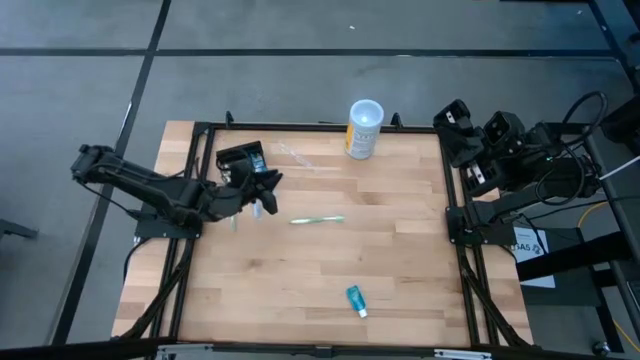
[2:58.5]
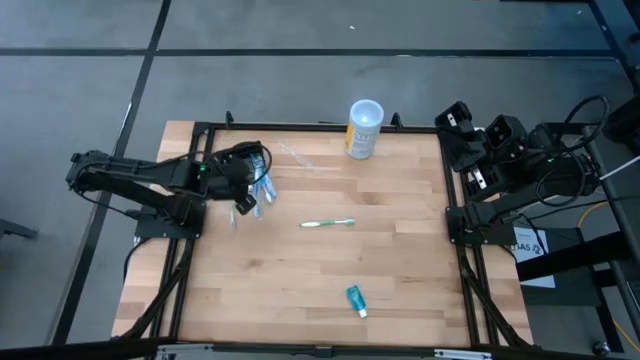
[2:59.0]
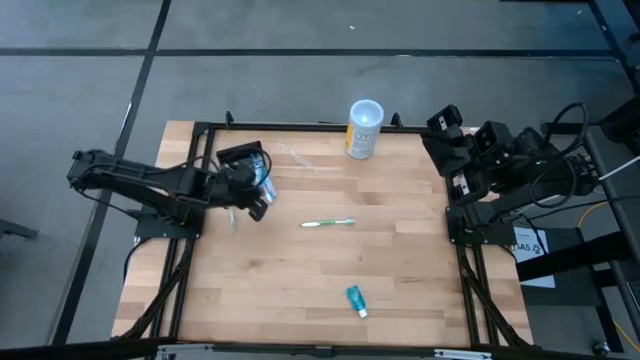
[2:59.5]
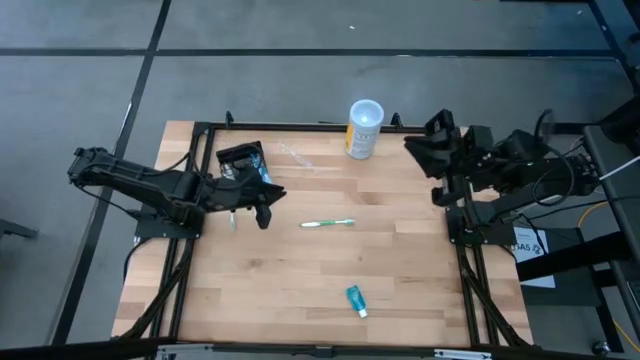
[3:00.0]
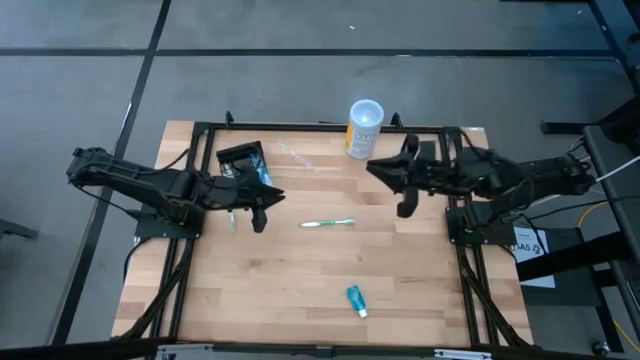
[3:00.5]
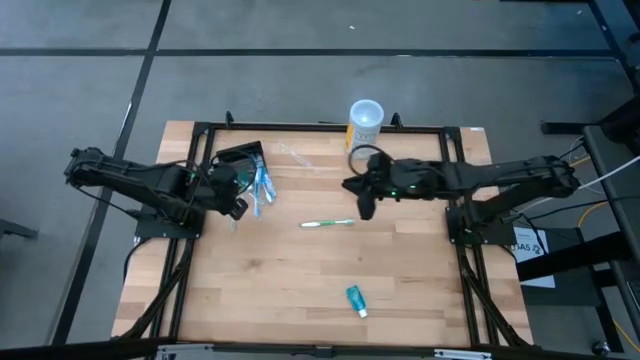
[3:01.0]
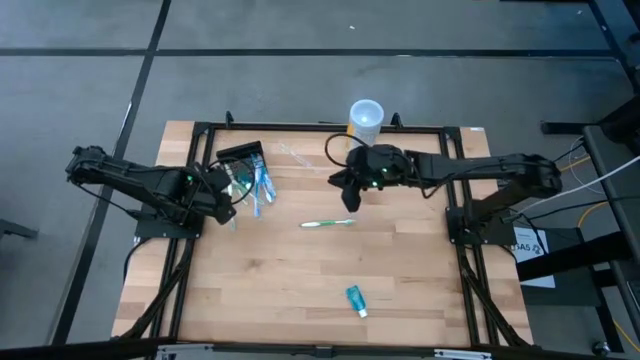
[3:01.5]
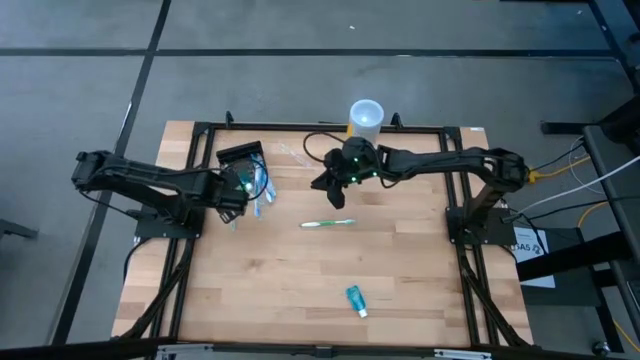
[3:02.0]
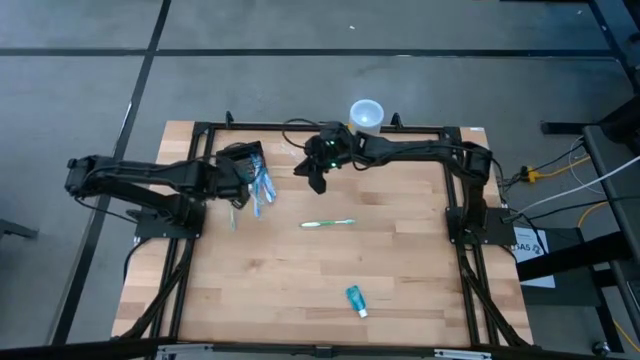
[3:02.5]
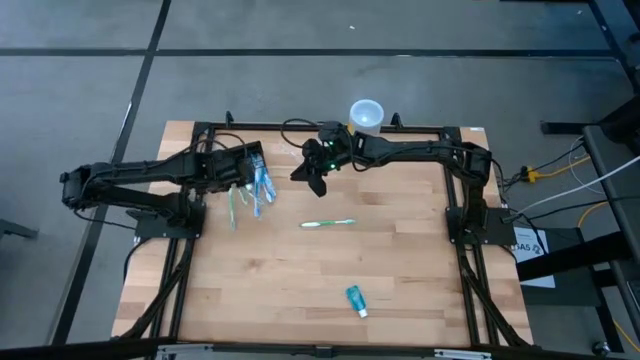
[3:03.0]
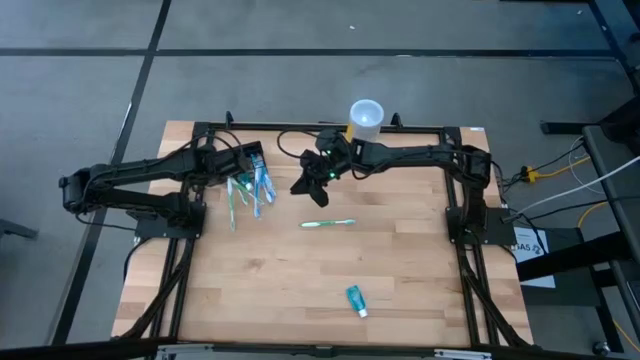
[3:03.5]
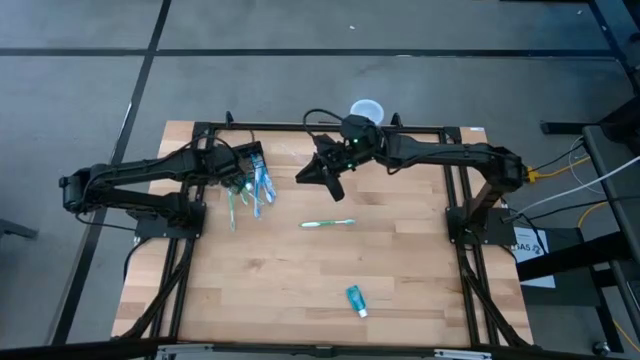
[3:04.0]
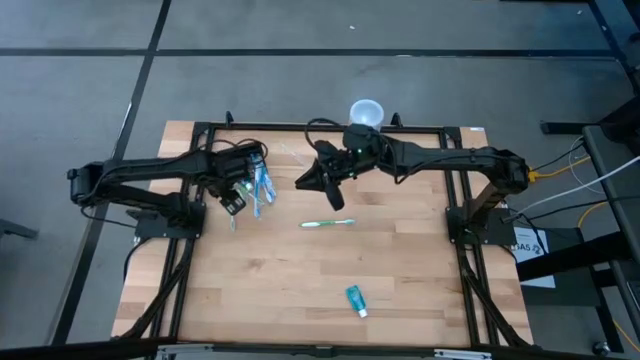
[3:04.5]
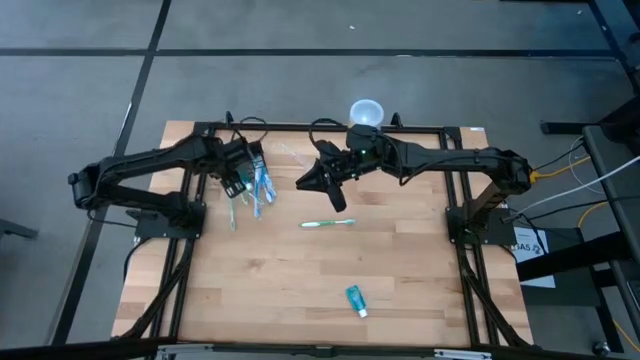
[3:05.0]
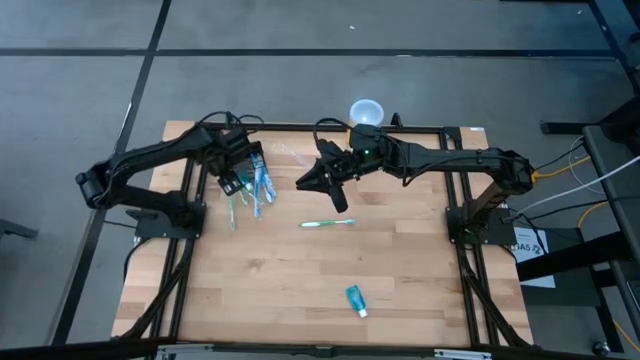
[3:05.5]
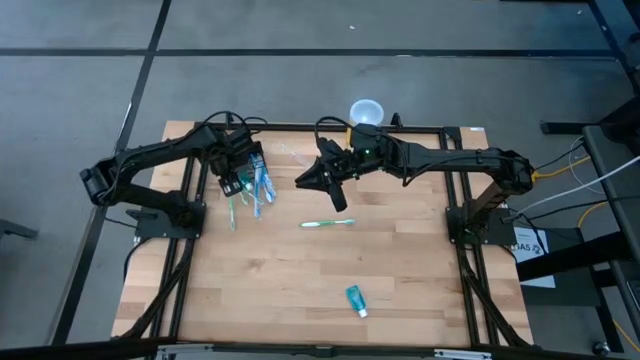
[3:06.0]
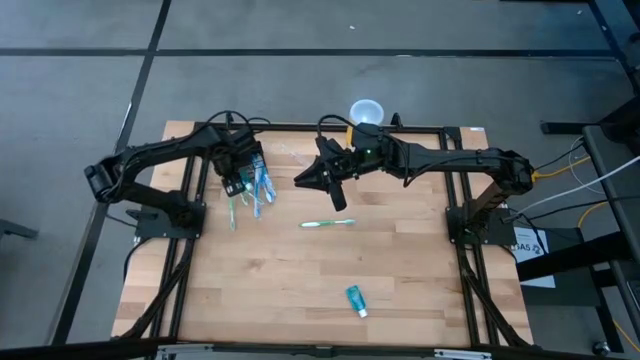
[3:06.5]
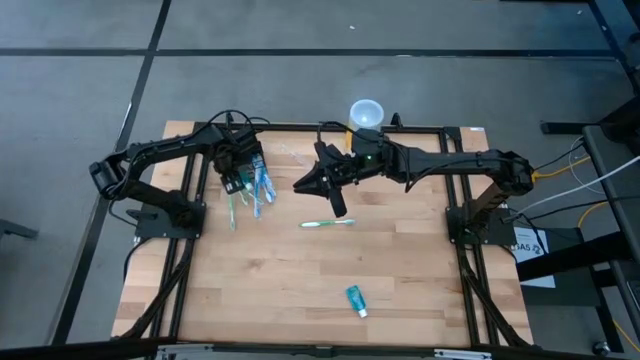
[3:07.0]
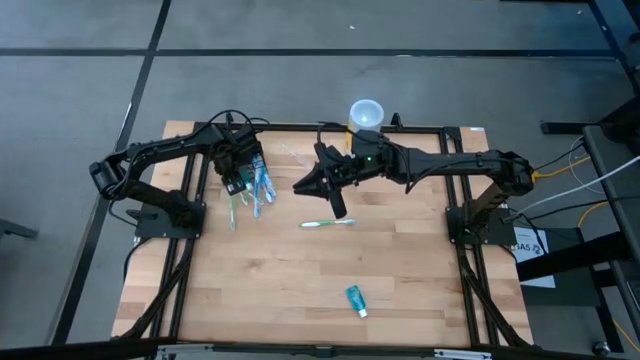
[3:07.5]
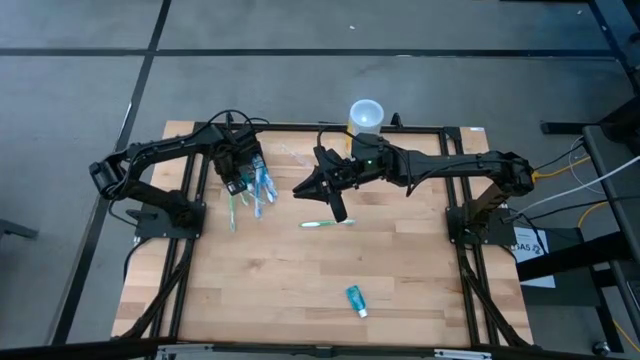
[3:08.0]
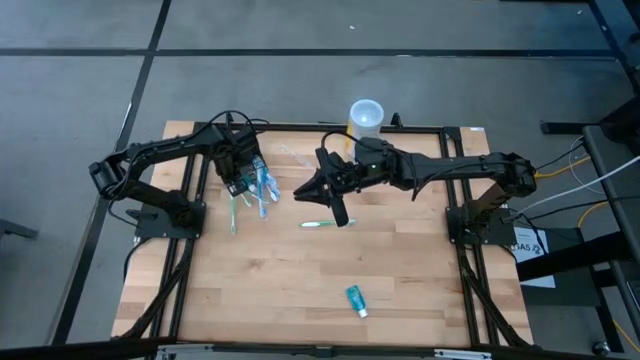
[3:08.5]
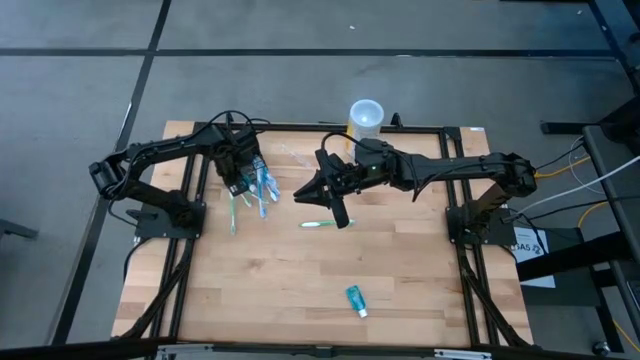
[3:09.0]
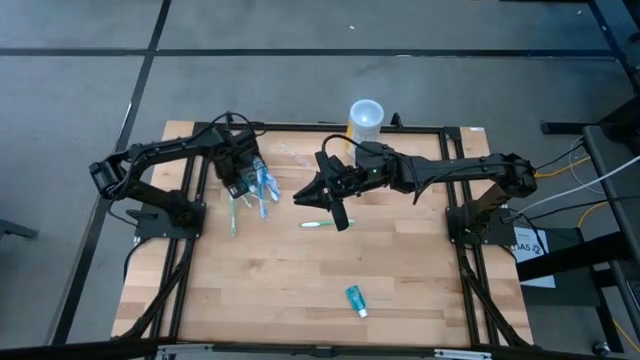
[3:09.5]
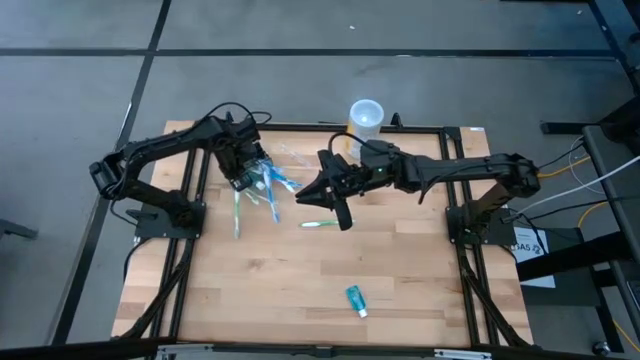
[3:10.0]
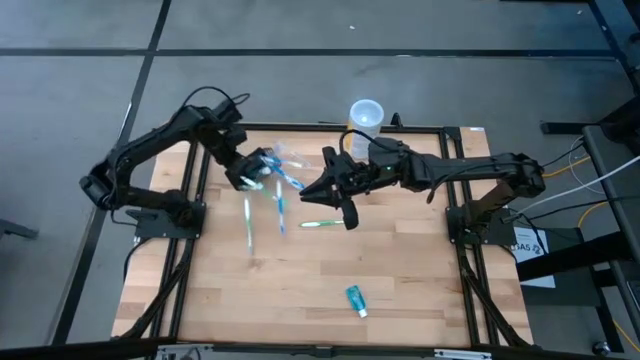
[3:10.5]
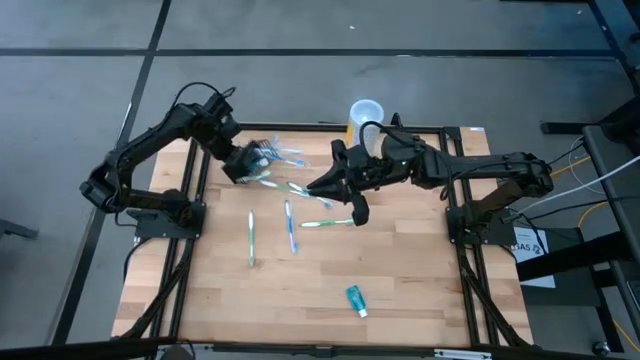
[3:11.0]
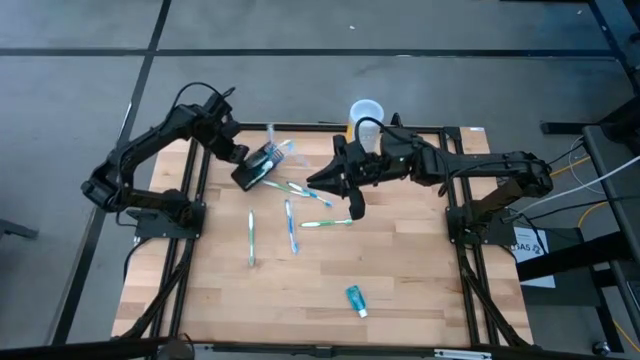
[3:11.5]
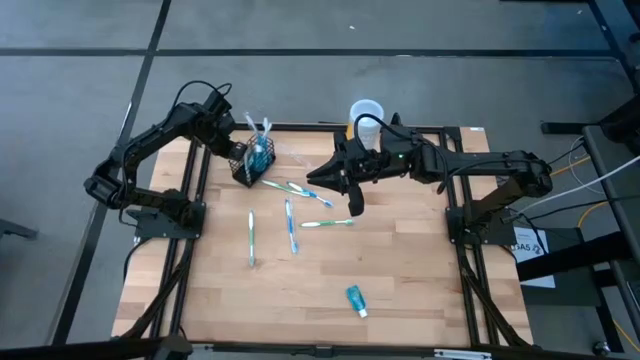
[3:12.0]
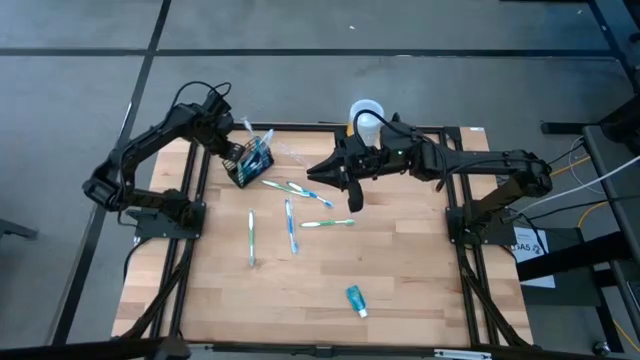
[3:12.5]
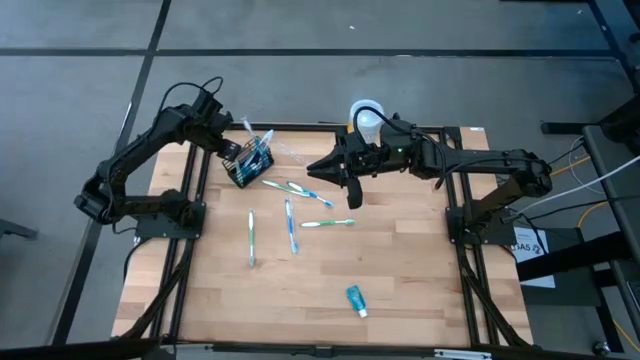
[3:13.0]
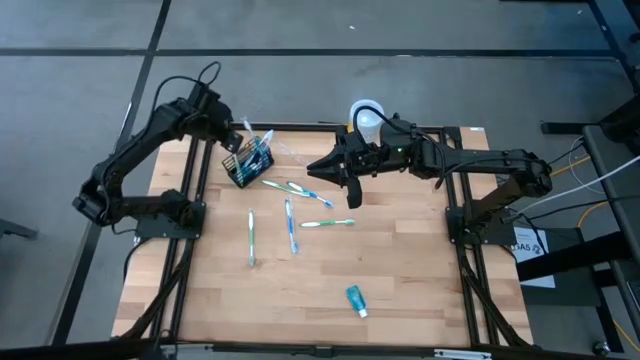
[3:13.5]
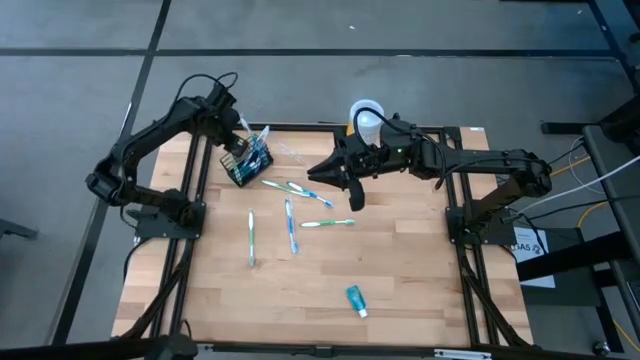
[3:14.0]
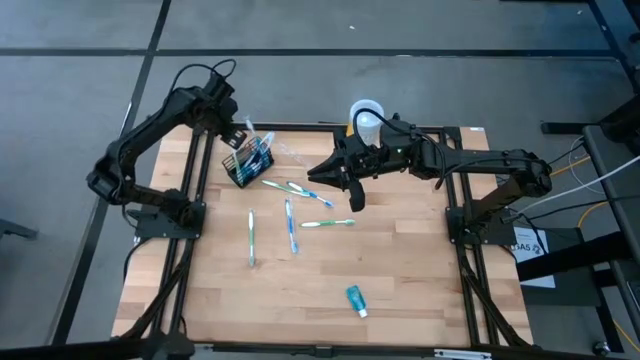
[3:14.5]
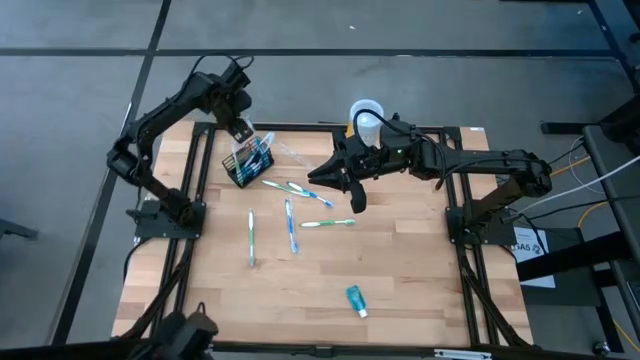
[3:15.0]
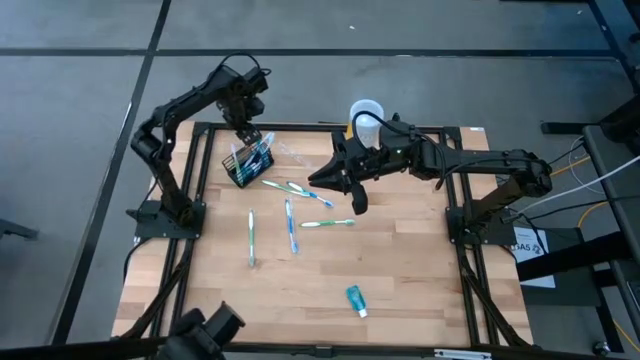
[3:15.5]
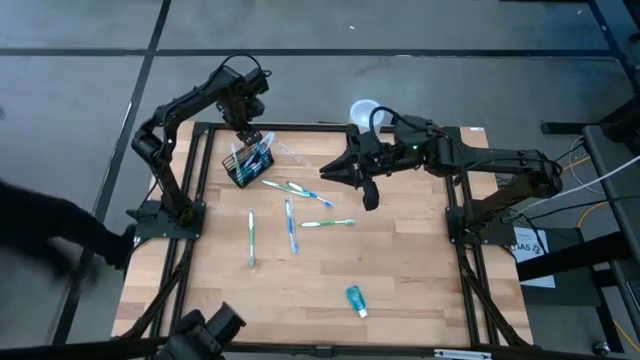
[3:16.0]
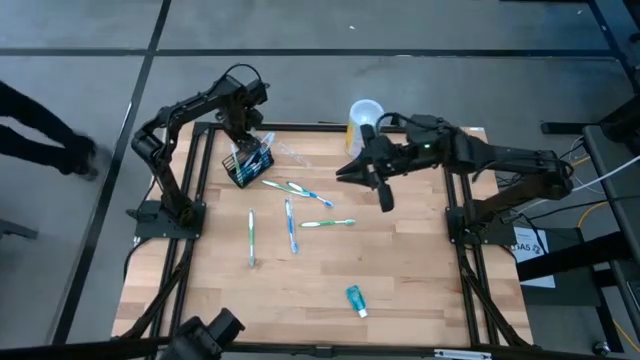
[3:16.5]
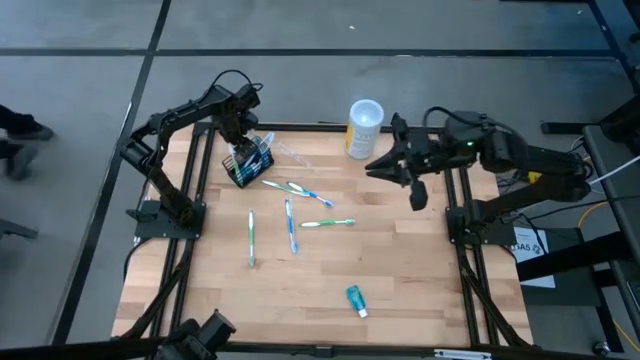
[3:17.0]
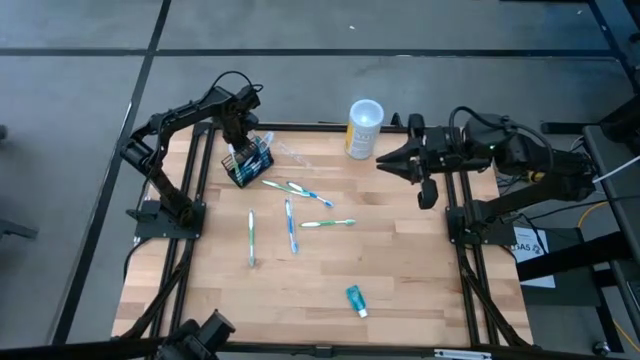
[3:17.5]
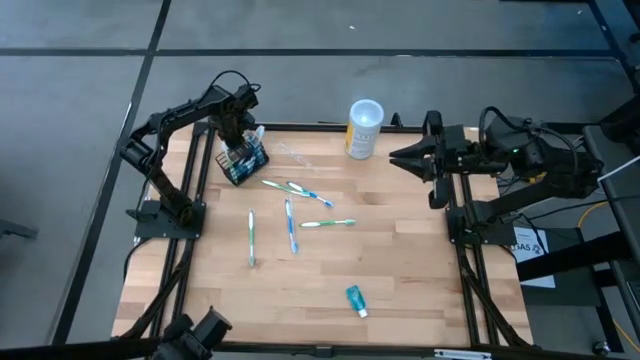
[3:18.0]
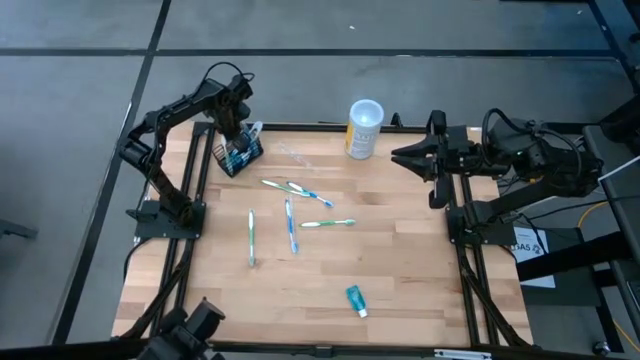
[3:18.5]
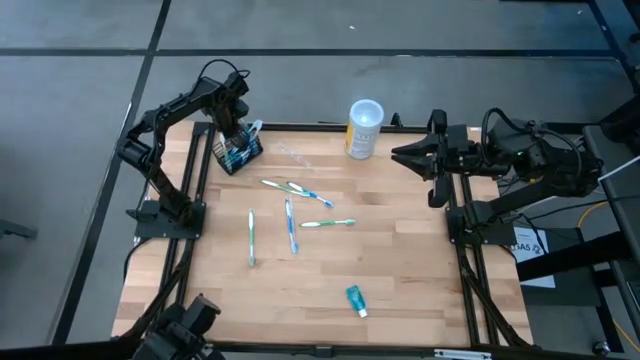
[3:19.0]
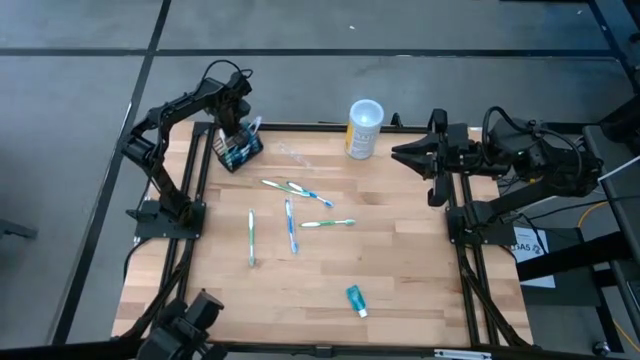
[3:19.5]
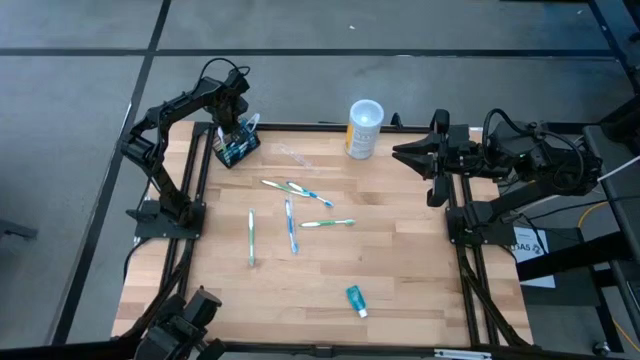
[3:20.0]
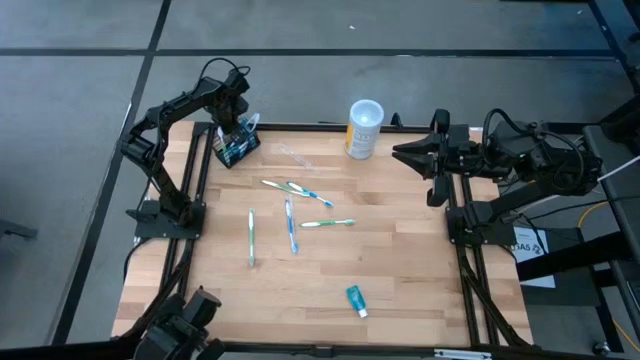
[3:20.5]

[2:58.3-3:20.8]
Task: Pick & Place toothbrushing station
Adjust the black wire organizer
